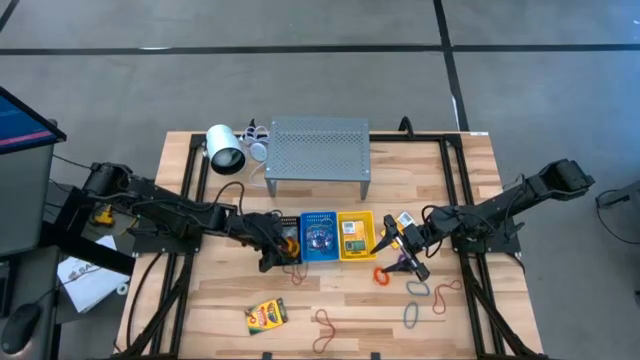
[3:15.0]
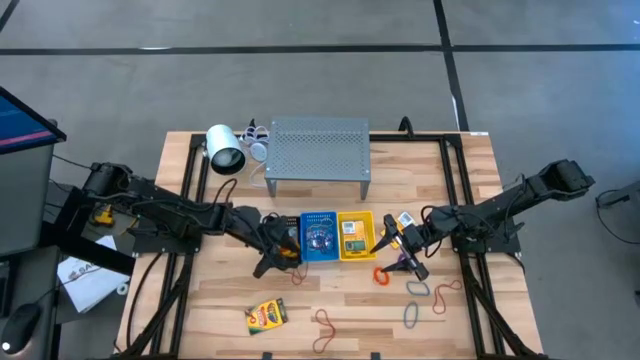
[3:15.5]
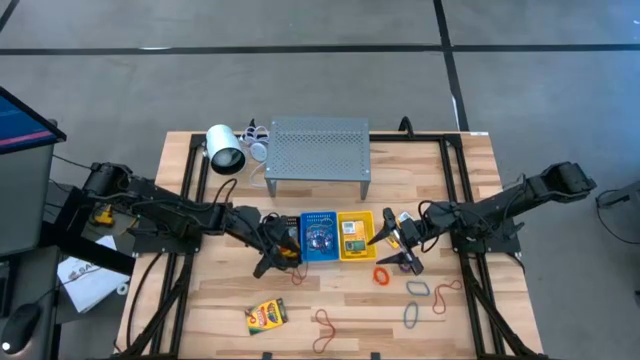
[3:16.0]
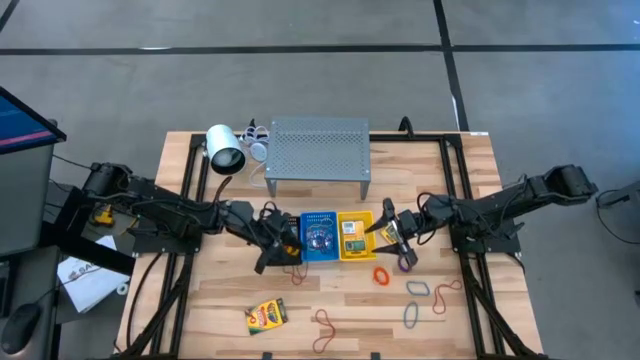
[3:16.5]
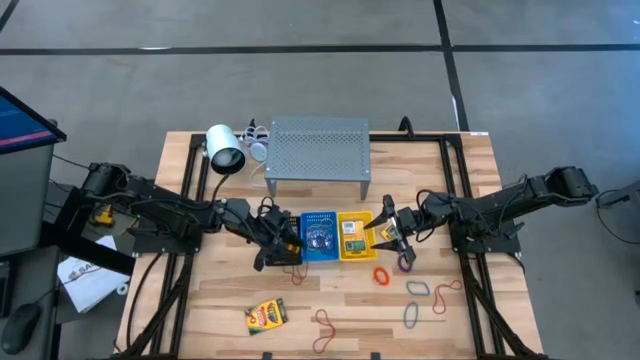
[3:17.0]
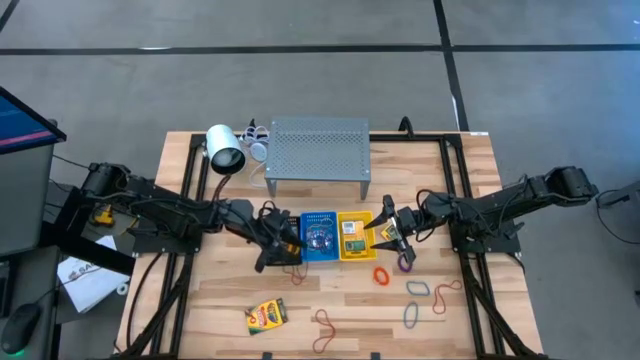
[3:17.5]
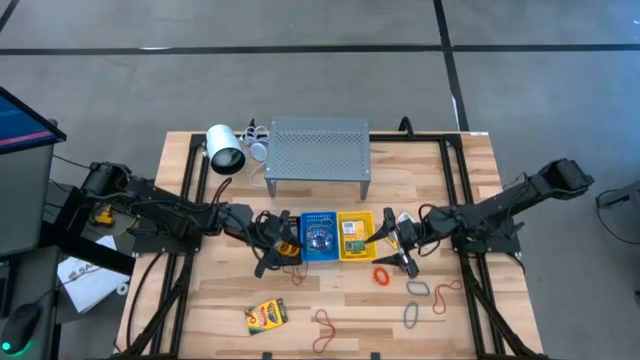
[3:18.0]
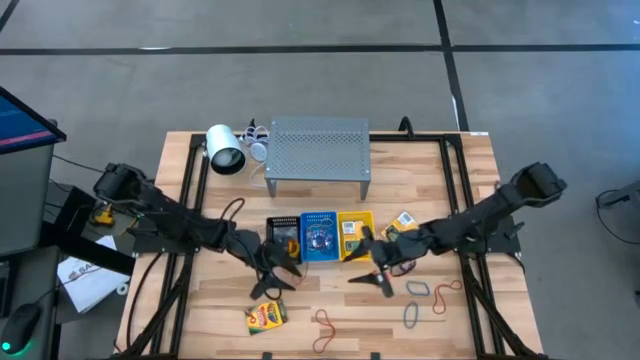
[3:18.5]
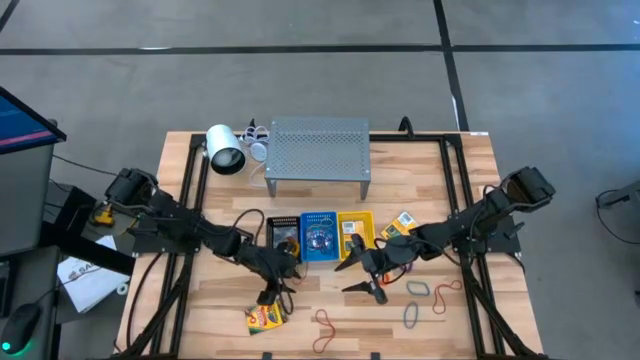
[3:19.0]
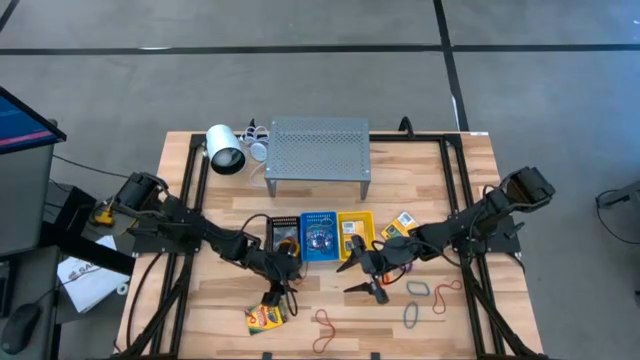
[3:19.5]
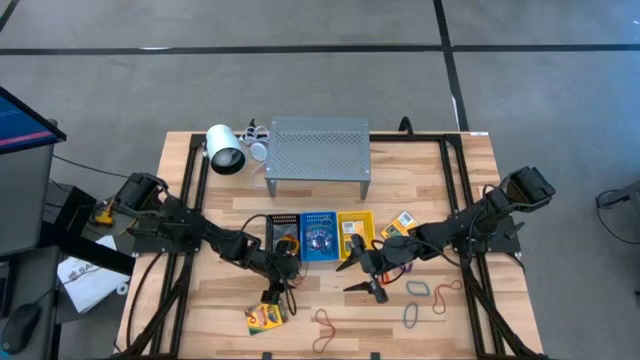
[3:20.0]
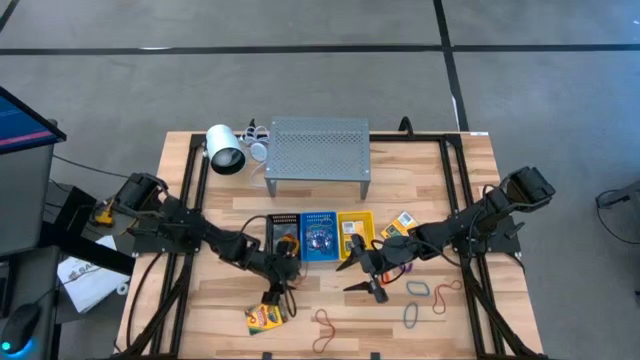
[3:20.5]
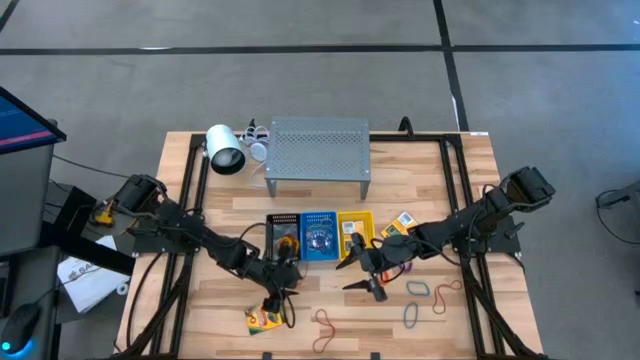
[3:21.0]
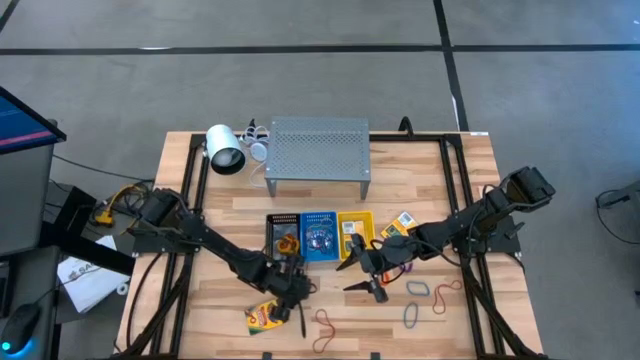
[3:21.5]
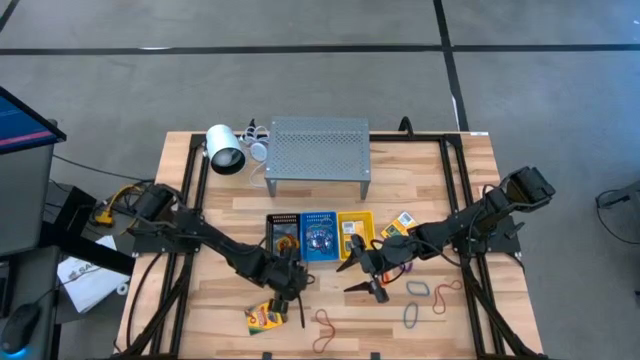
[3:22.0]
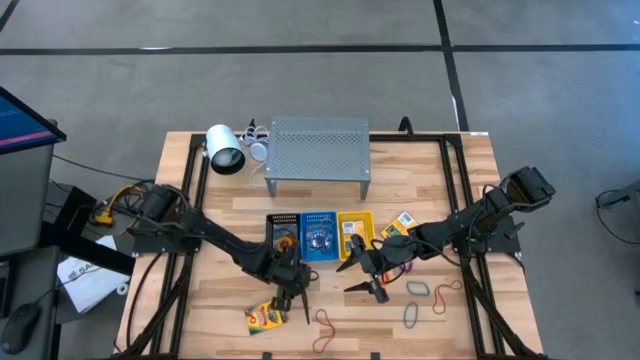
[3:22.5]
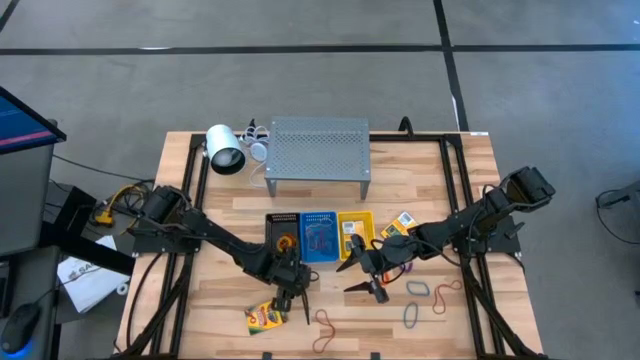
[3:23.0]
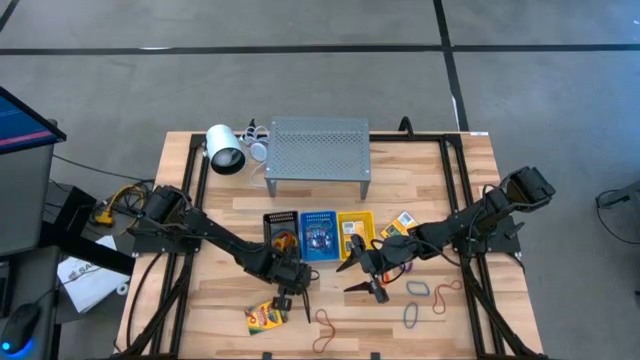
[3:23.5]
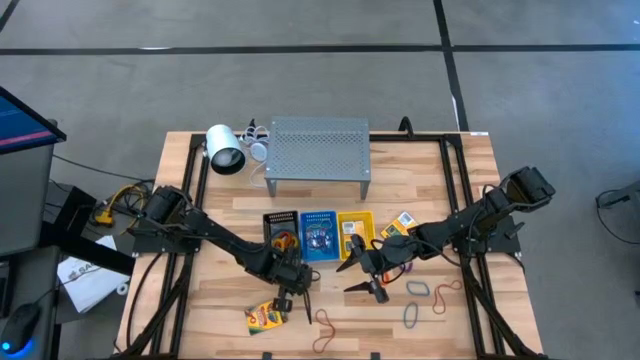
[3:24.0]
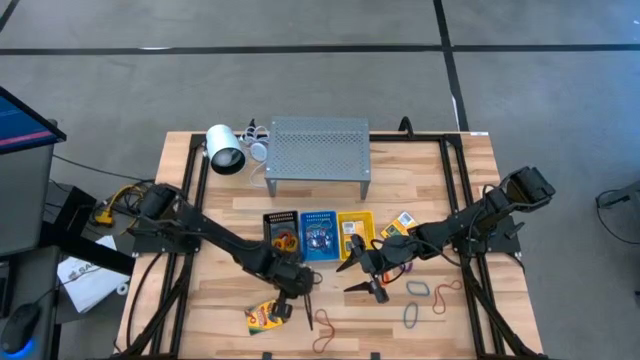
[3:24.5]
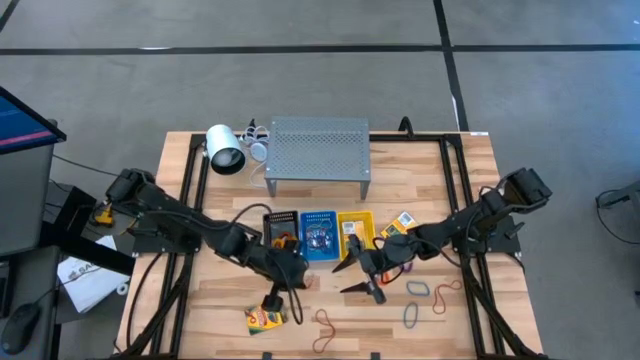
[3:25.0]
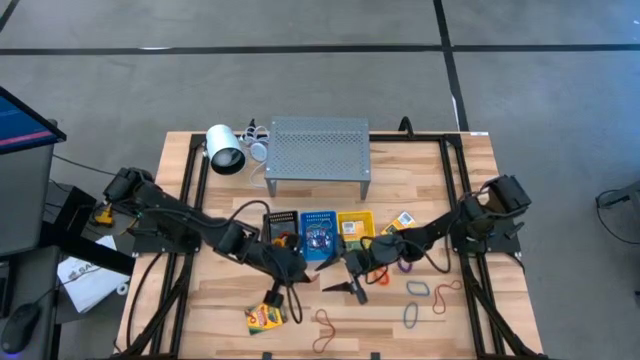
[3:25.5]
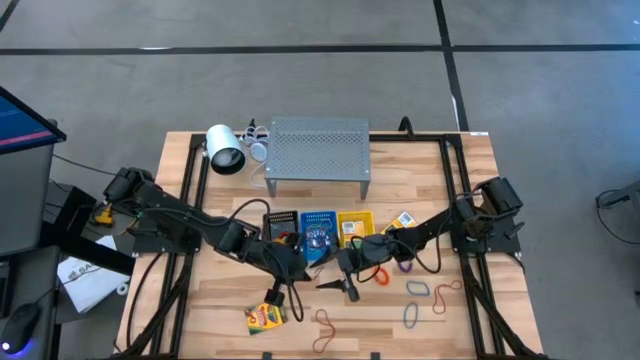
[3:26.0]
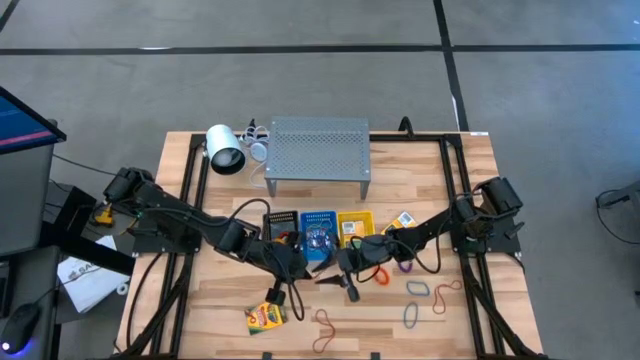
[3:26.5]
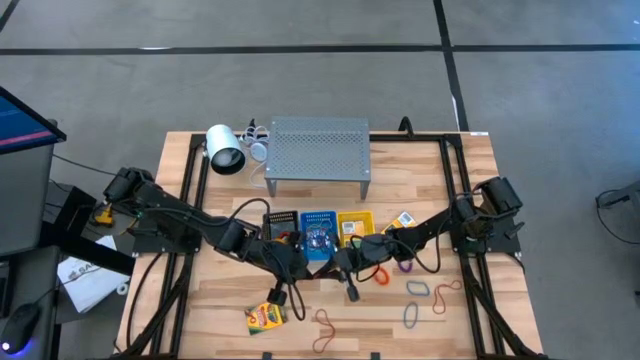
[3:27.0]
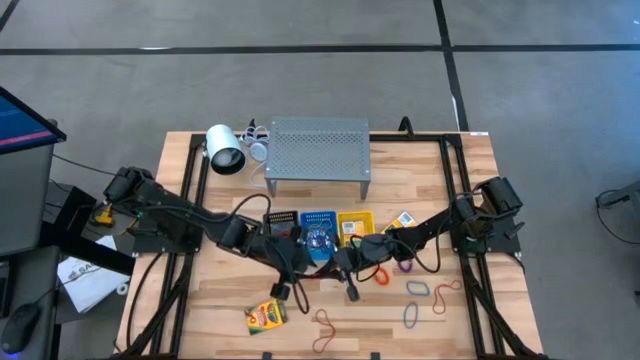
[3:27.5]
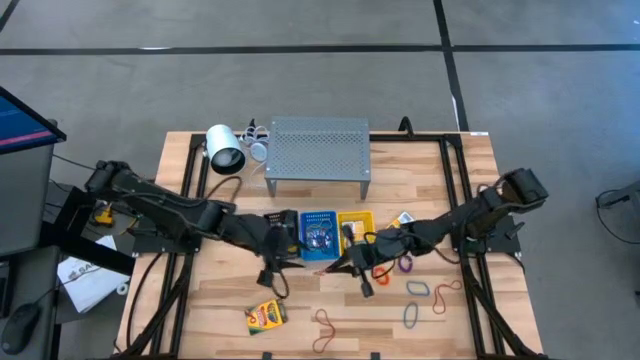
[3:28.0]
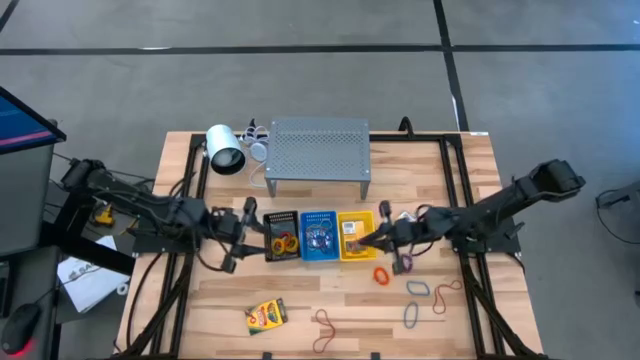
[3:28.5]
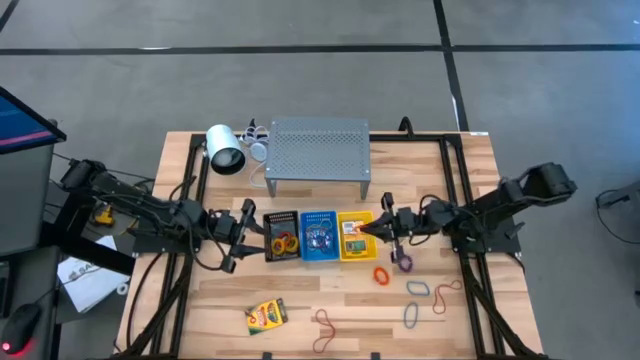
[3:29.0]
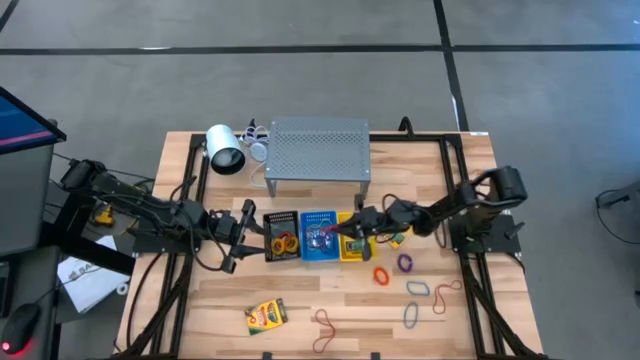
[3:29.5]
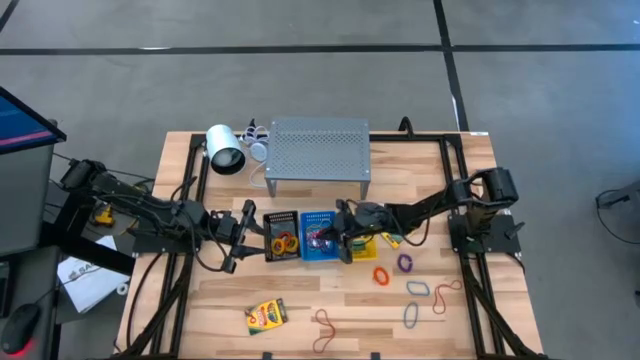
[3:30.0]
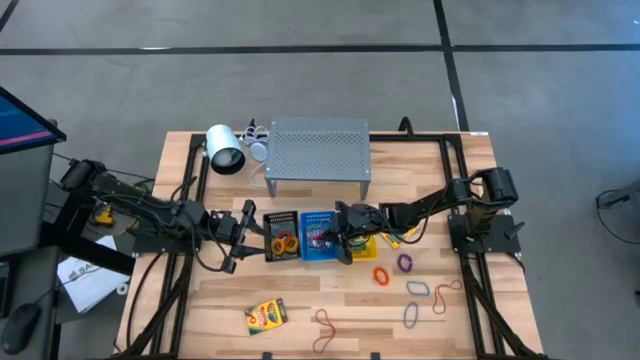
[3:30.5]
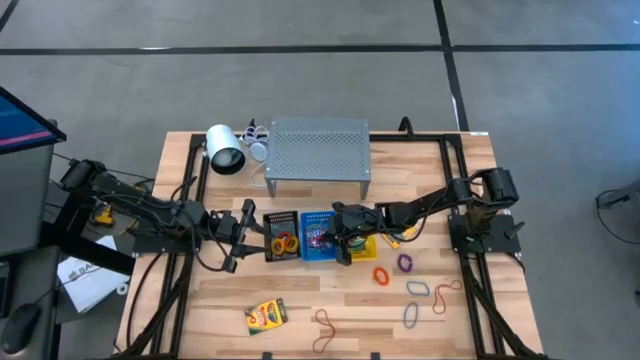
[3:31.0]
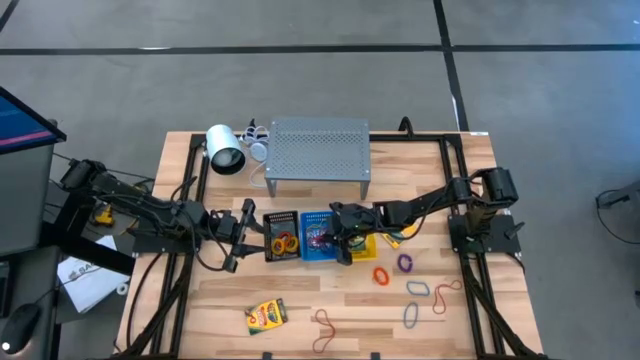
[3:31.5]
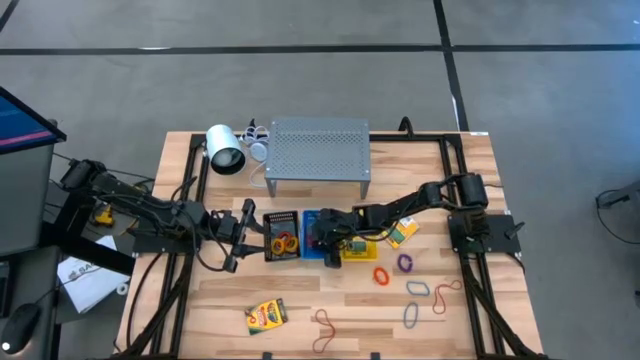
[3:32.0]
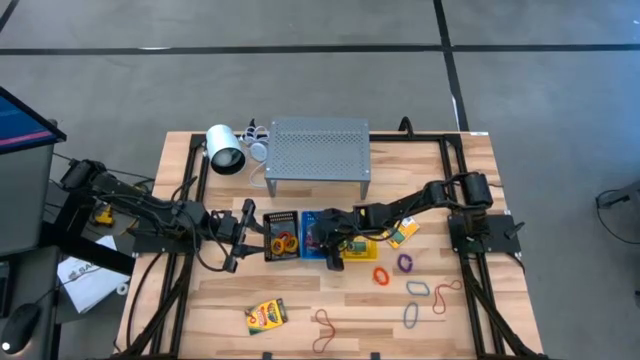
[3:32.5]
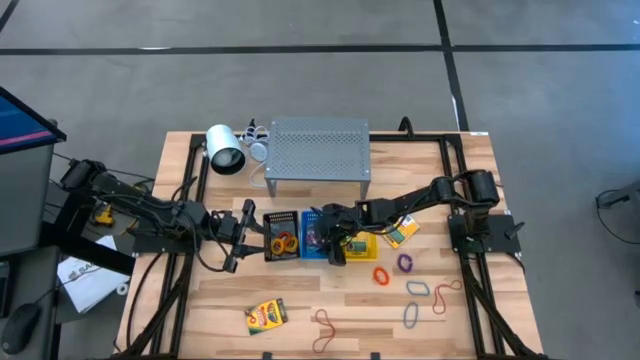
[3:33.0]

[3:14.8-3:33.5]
Task: Pick & Place Office Desk Supplies
Put the red rubber band into the blue basket

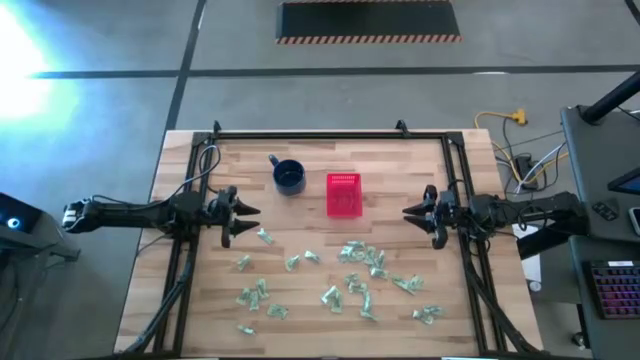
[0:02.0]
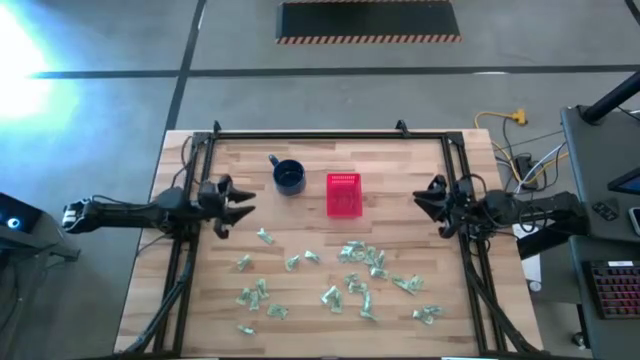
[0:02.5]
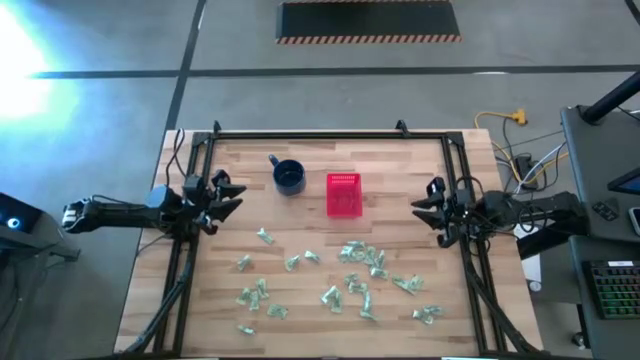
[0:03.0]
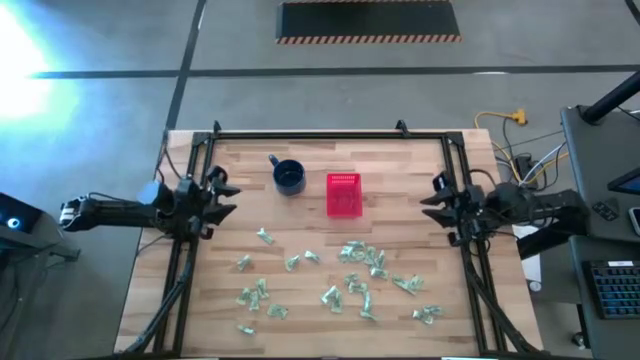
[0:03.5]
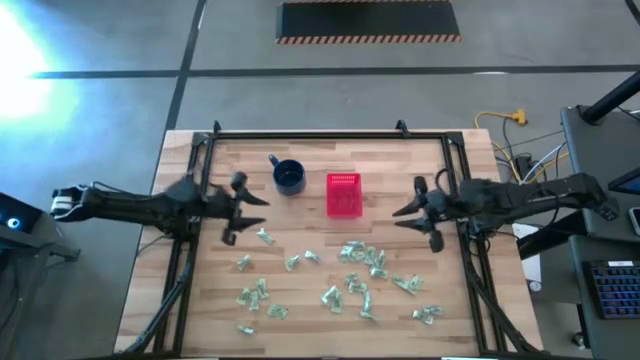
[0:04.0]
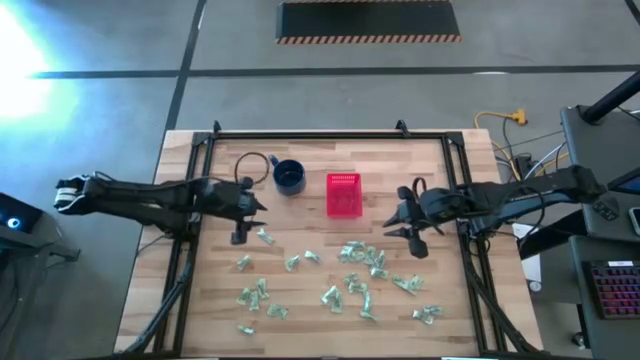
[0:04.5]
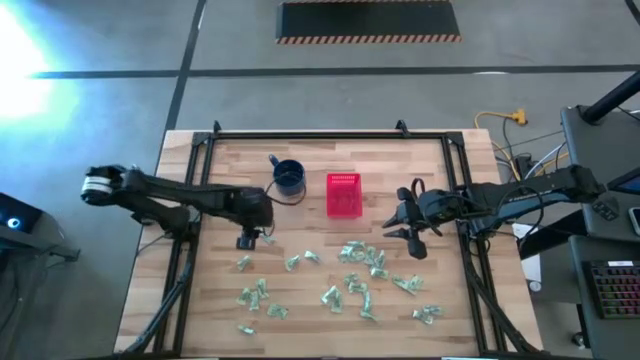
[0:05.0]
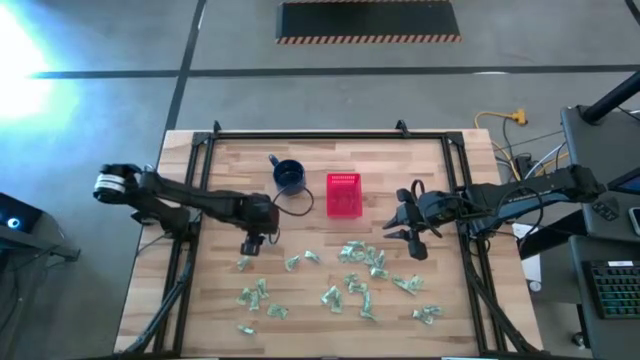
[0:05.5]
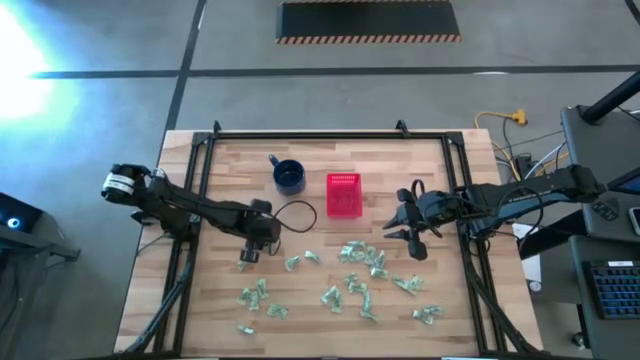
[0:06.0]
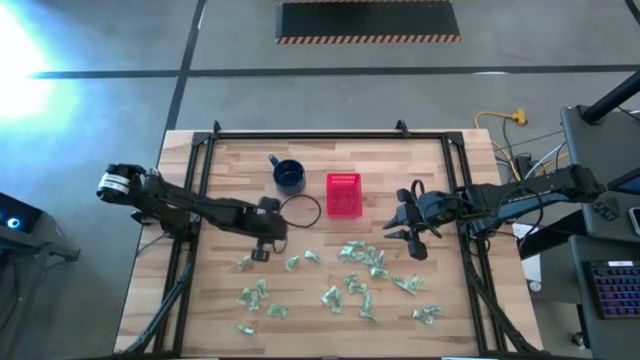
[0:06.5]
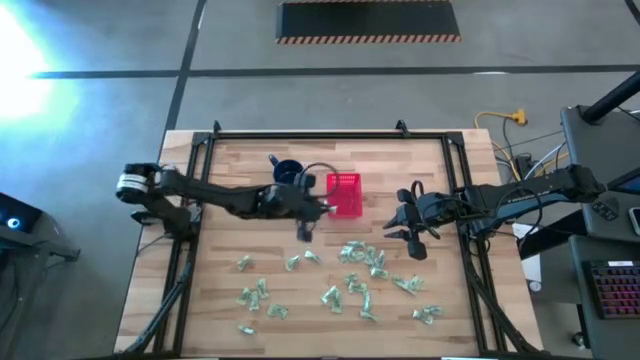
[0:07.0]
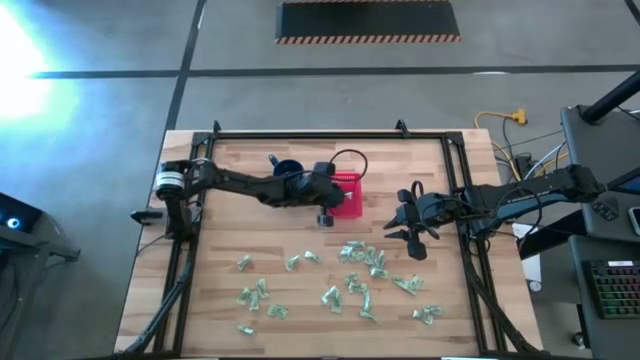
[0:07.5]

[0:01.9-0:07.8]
Task: Pick and place items into bin
Put the green stevia packet into the red bin
